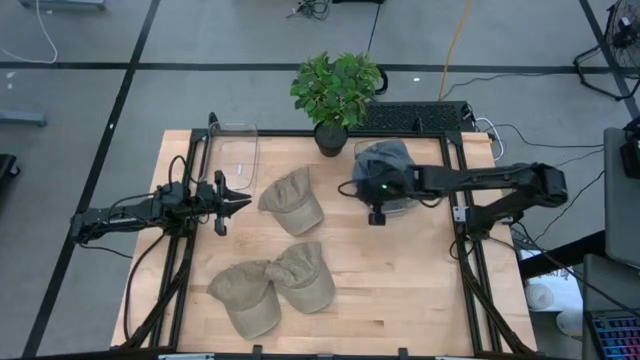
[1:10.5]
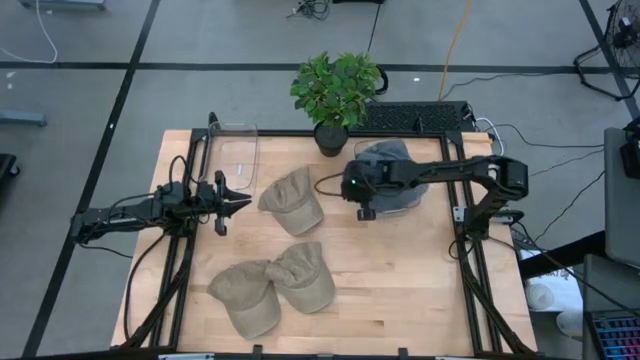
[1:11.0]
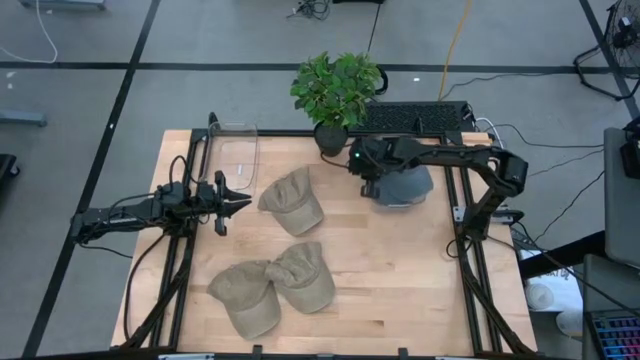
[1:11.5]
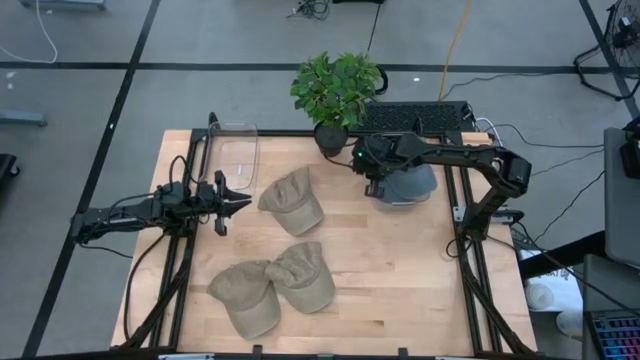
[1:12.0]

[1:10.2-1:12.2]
Task: Pick & Place hat
Adjust the transparent bin

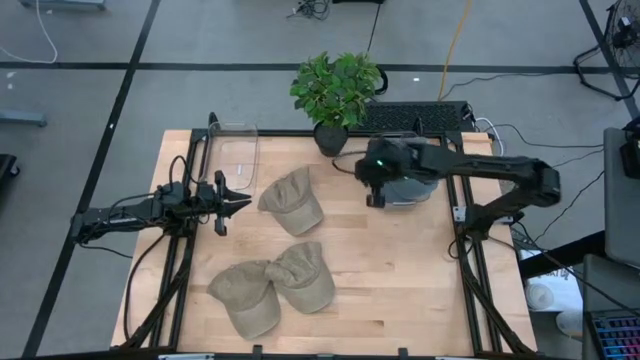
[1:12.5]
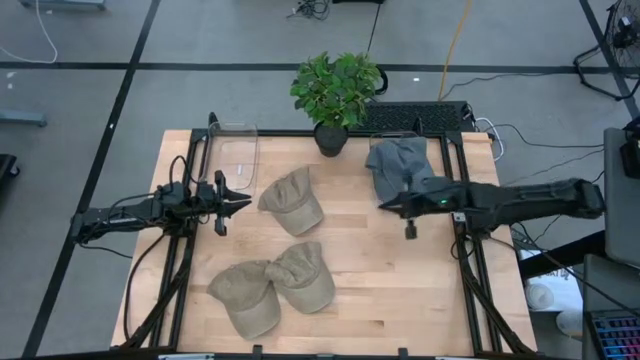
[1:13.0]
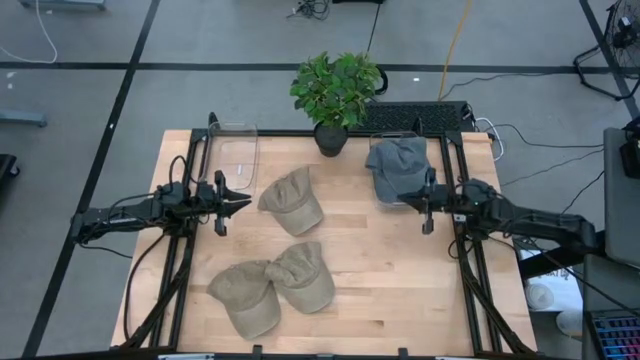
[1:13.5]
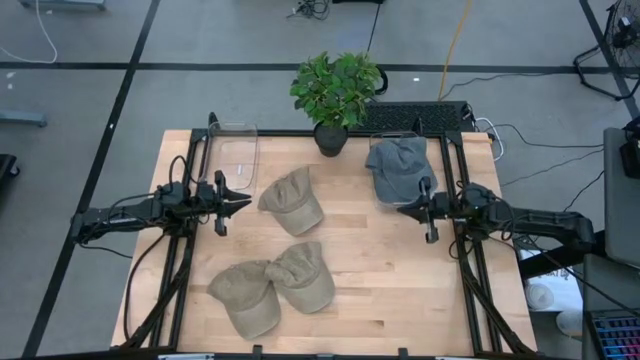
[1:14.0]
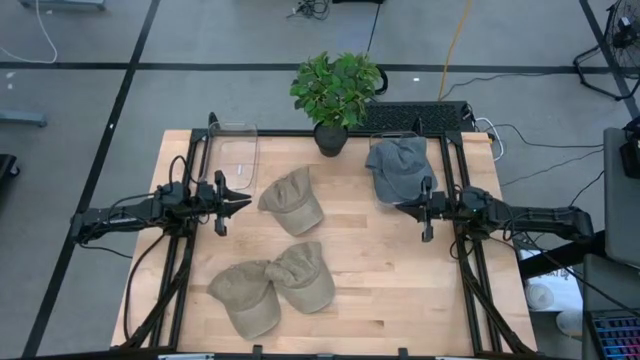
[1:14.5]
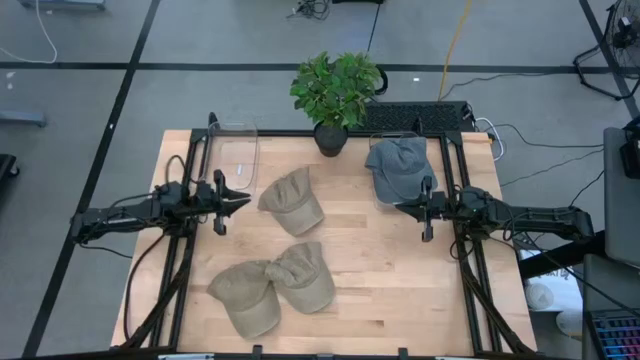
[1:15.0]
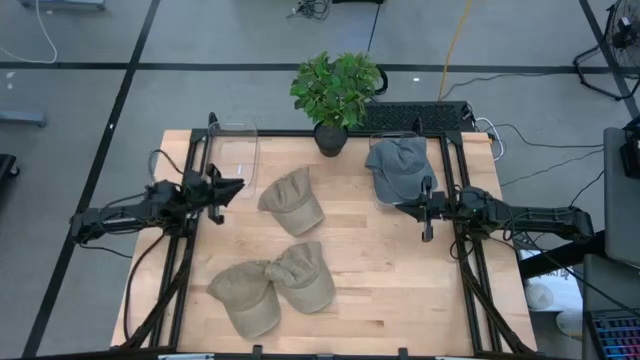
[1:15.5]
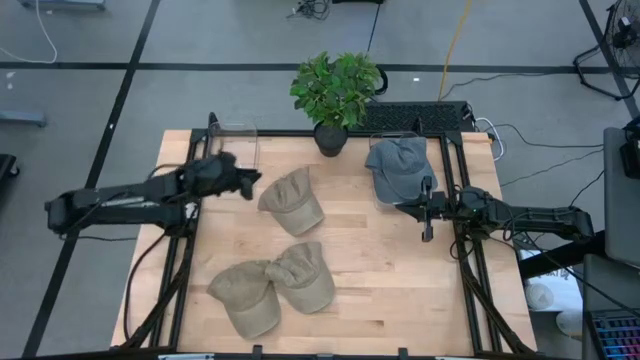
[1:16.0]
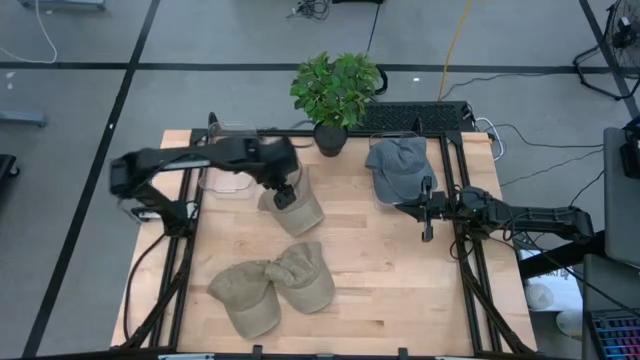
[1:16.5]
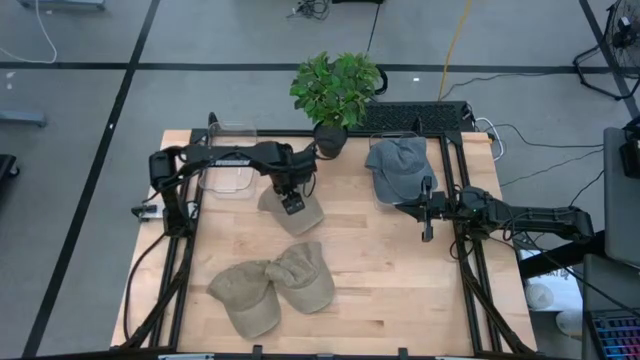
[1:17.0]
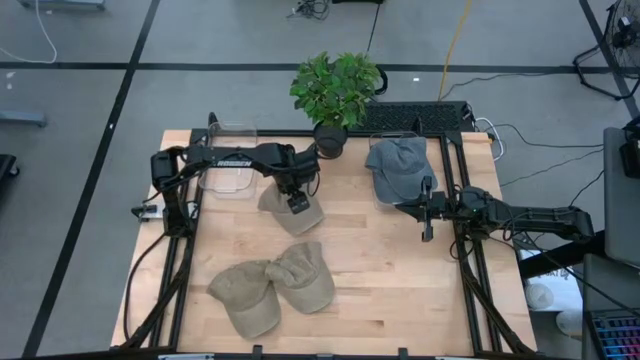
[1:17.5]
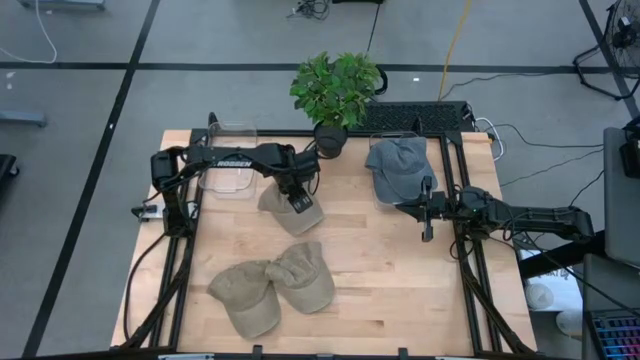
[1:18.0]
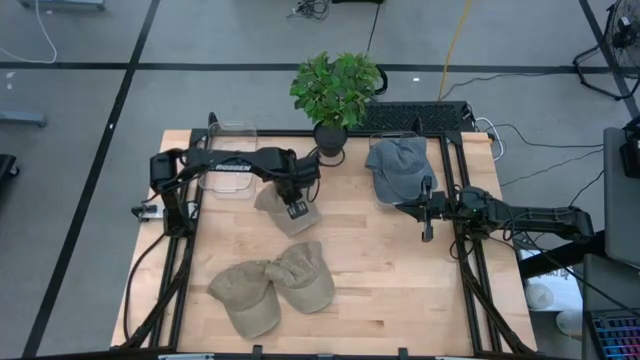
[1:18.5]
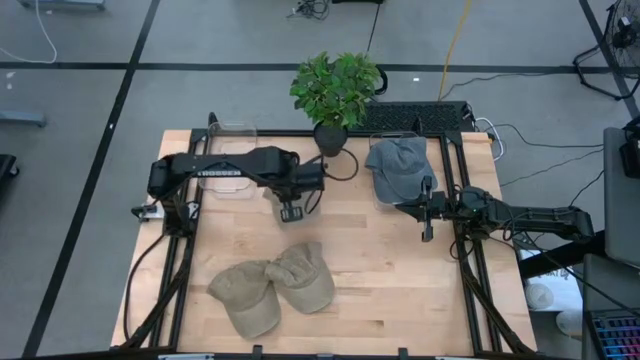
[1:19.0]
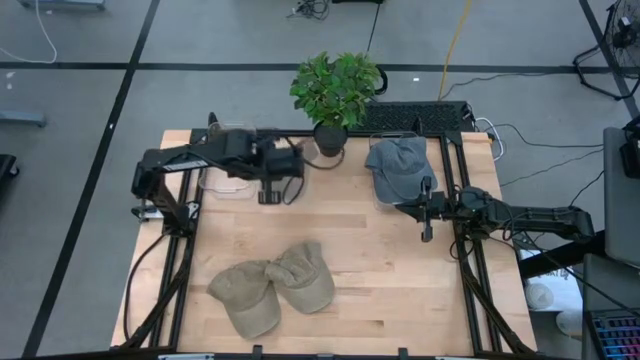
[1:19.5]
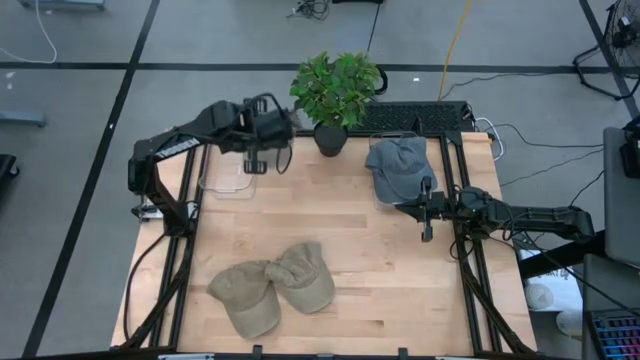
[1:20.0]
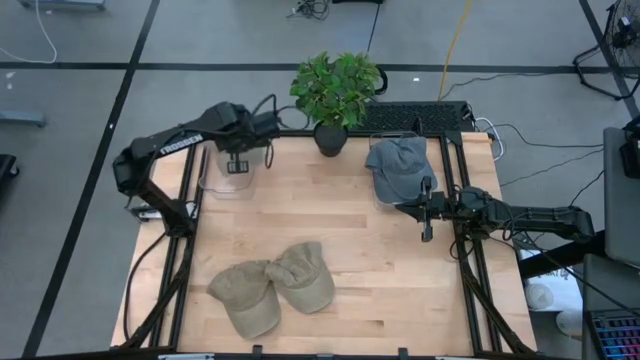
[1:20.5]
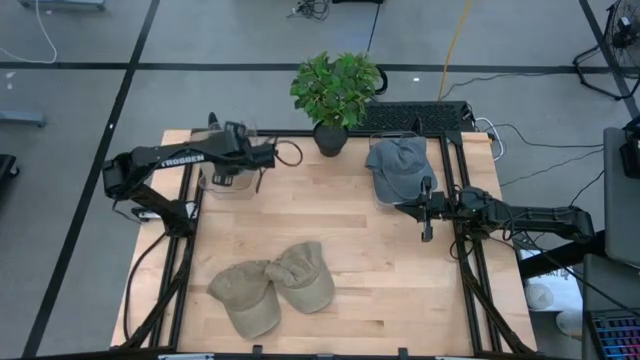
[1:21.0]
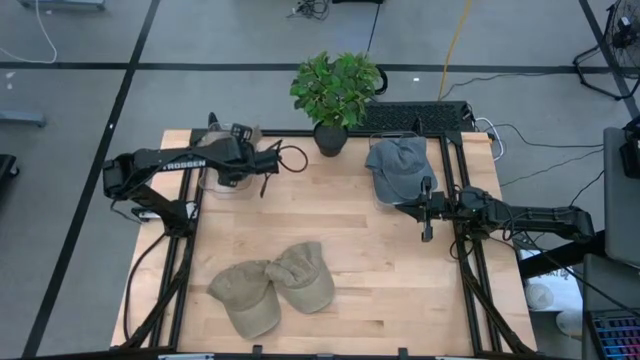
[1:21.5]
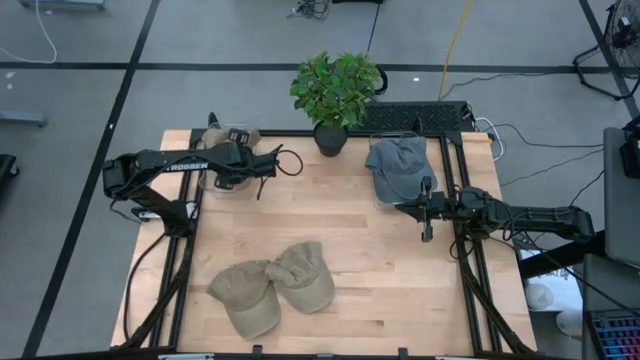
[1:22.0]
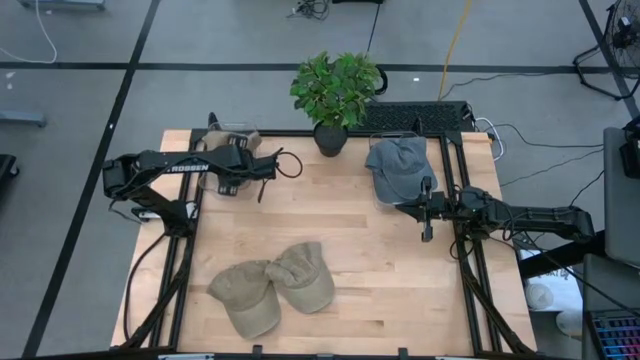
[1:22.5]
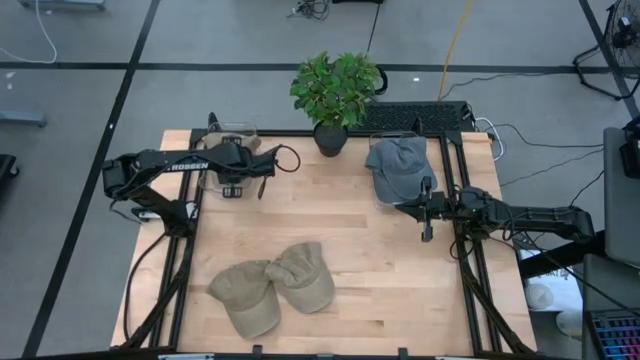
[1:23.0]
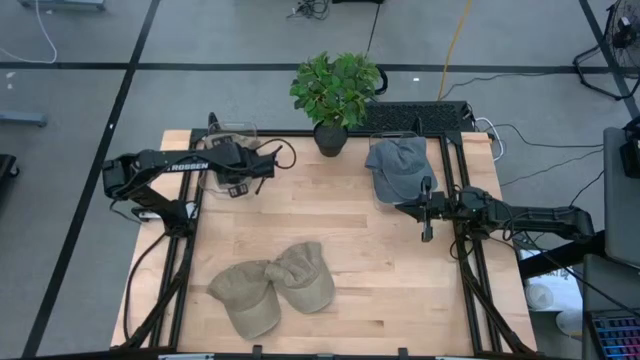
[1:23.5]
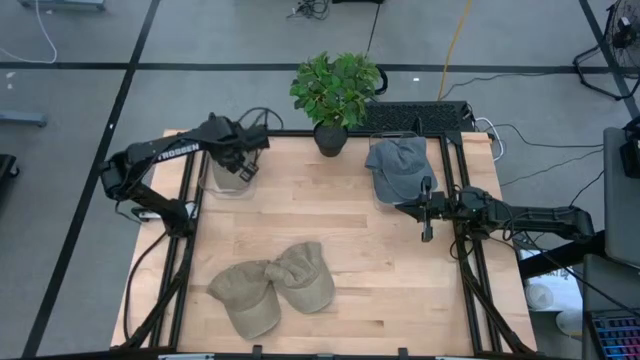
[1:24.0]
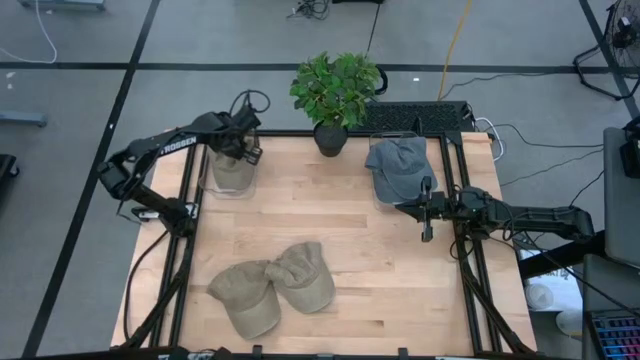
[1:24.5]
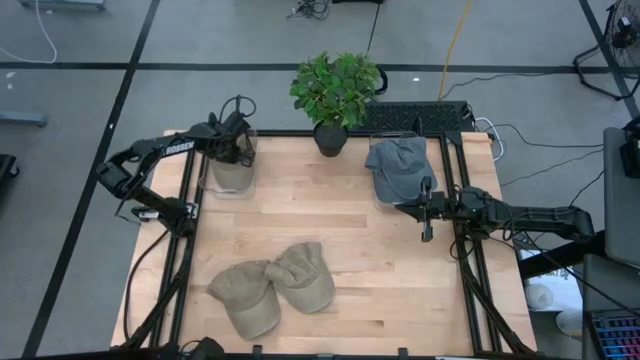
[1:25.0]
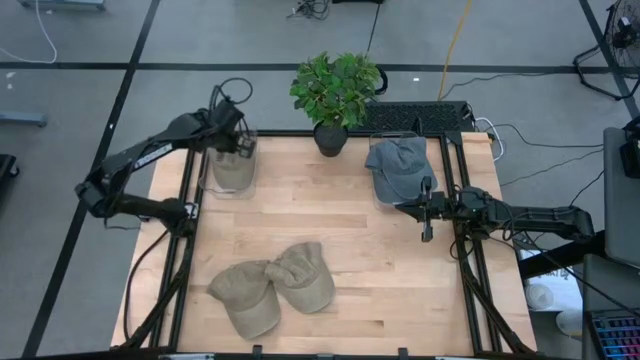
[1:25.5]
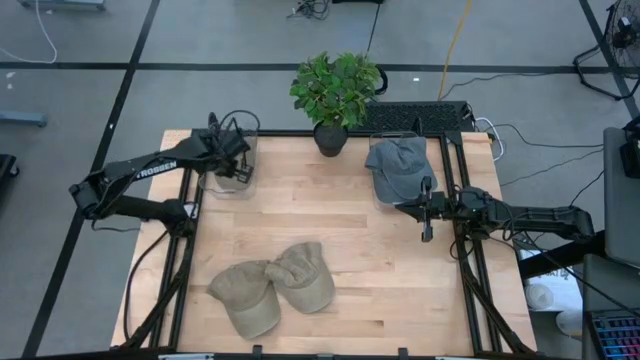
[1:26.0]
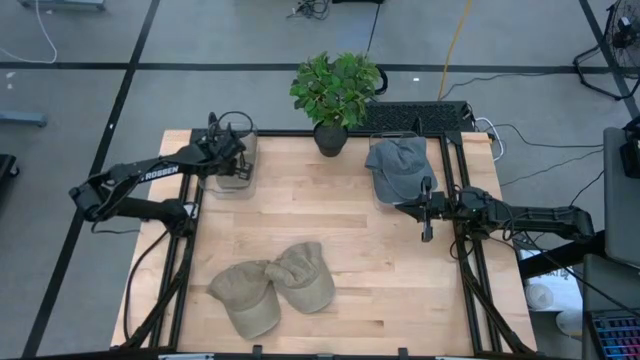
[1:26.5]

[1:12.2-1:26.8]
Put the top brown cap into the left transparent bin

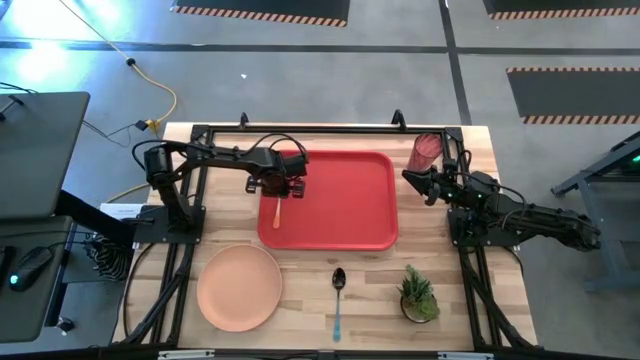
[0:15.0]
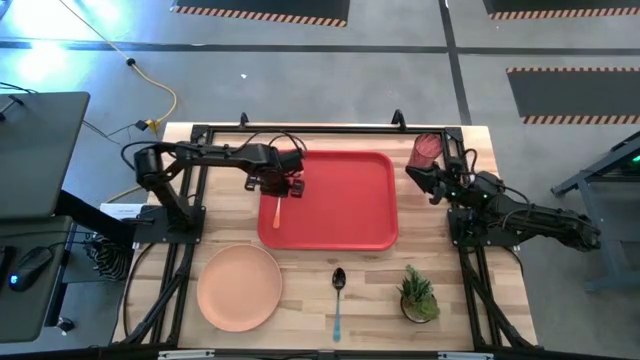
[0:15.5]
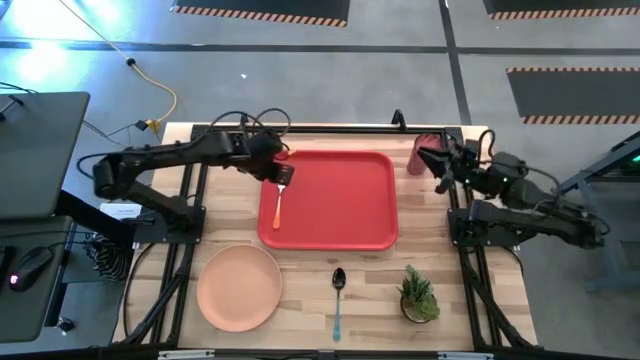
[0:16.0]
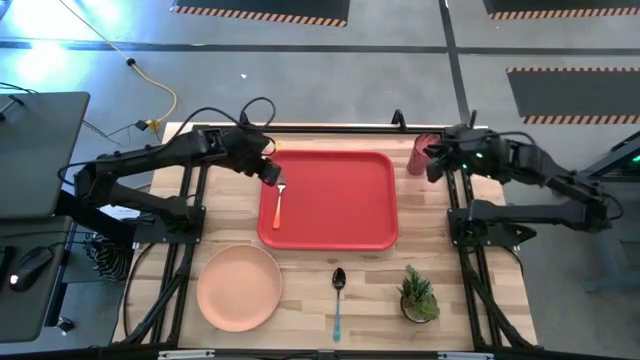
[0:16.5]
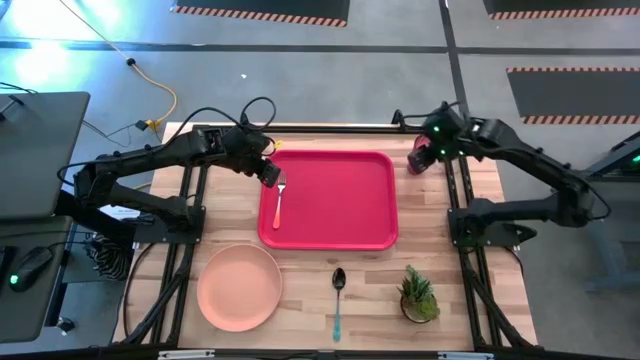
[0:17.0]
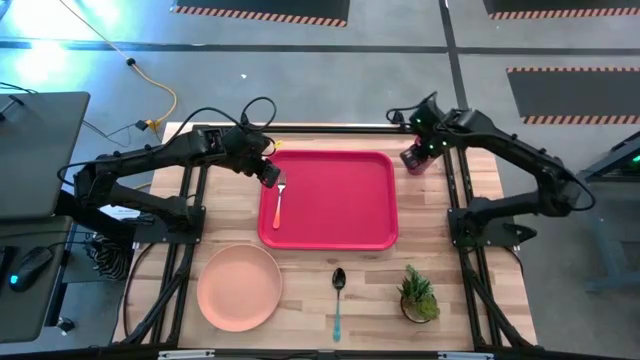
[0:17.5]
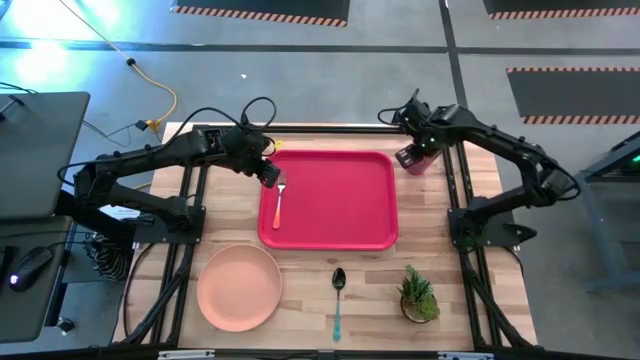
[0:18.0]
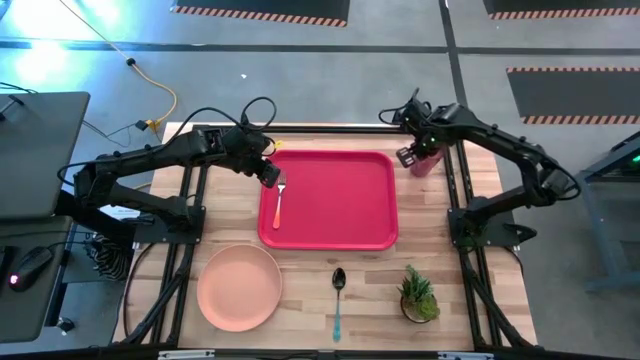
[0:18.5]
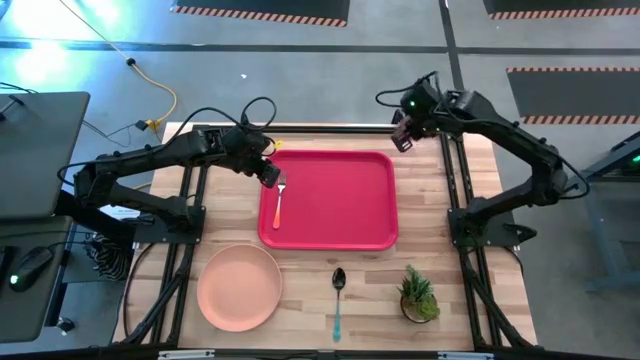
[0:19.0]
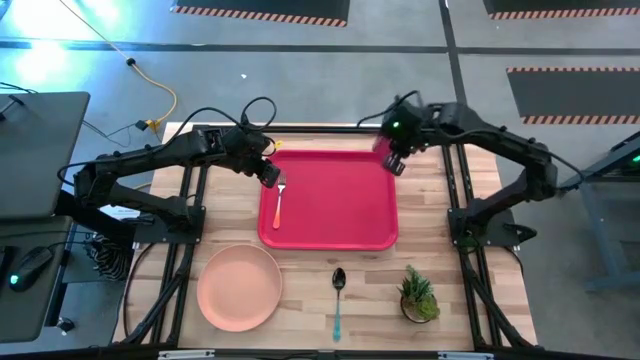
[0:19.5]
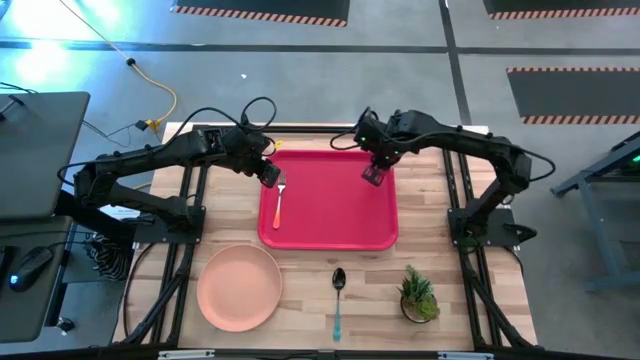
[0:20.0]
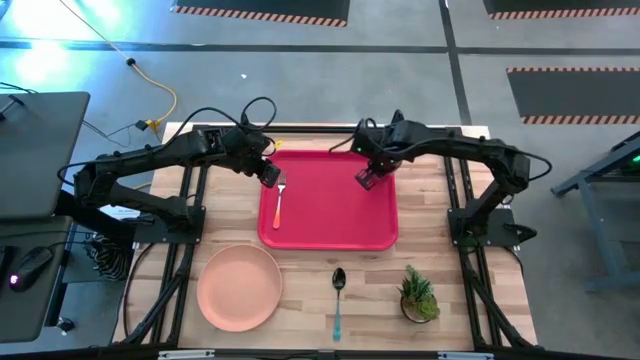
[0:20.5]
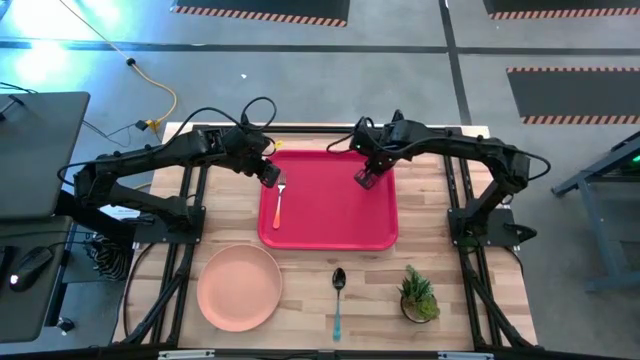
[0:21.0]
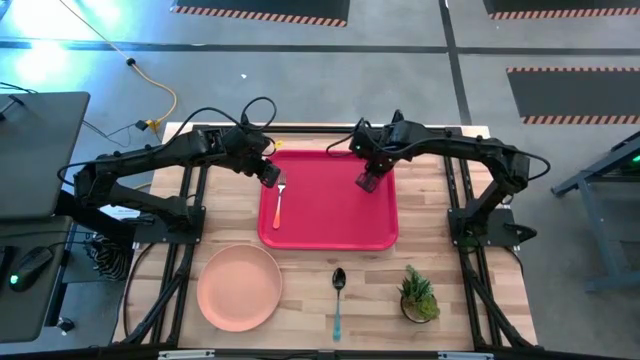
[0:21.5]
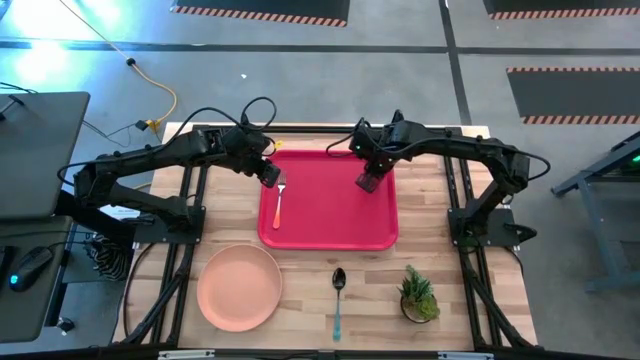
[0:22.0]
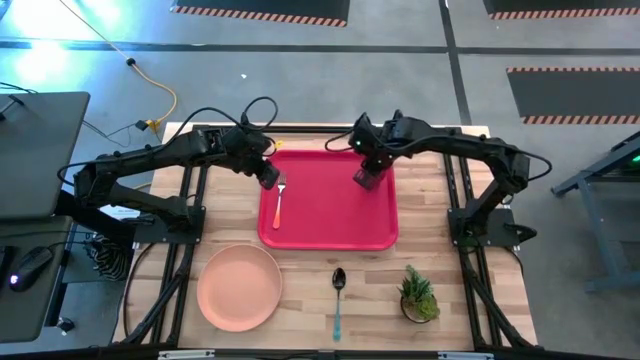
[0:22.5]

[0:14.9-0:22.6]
Task: Pick and place plate/cup/fork/spoon on tray
Put the cup on the tray to the right of the fork
